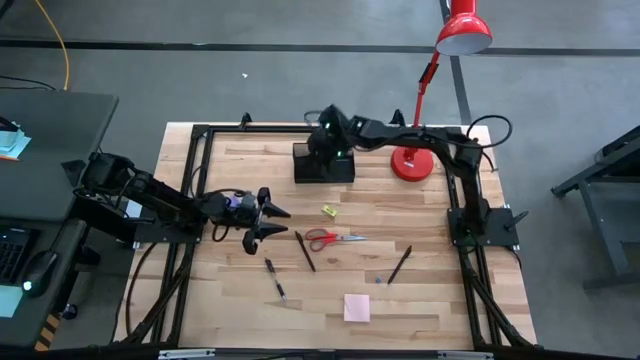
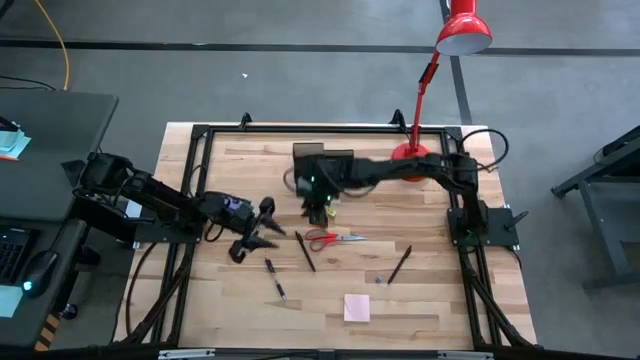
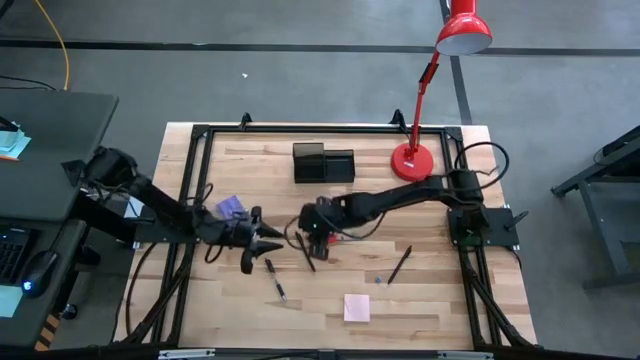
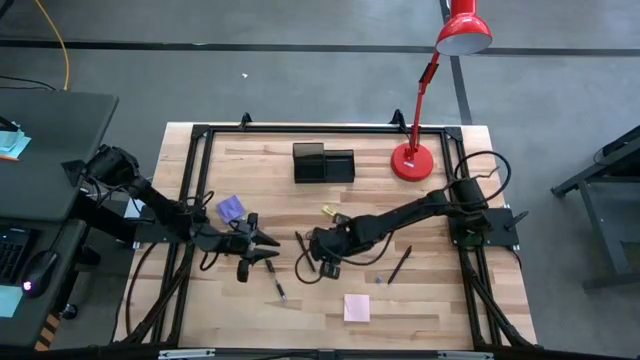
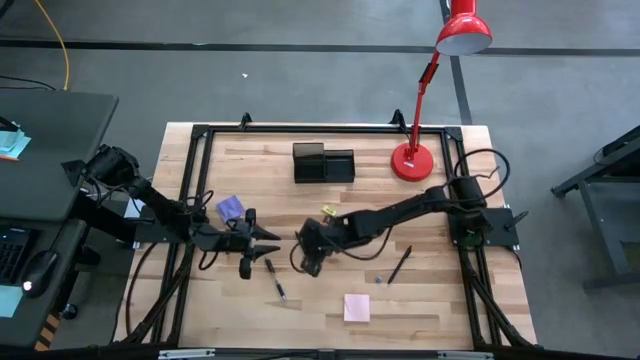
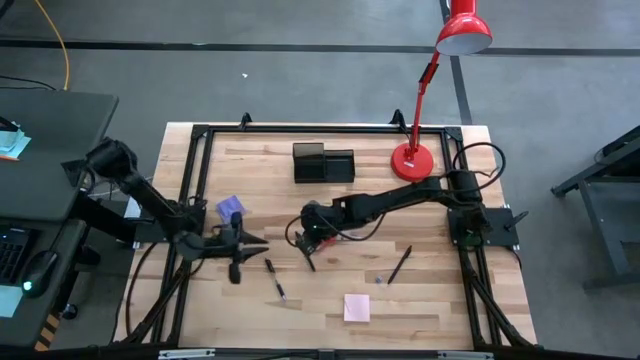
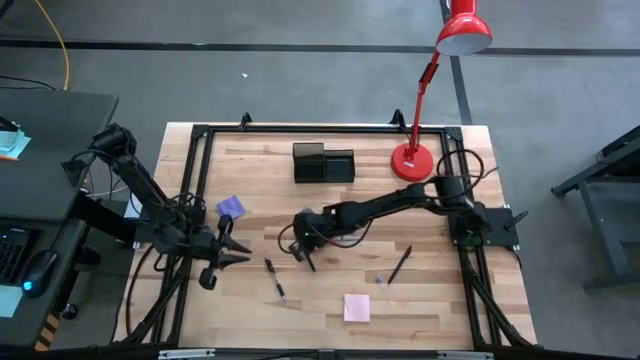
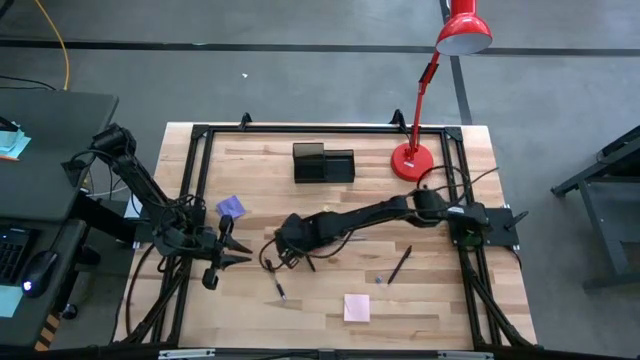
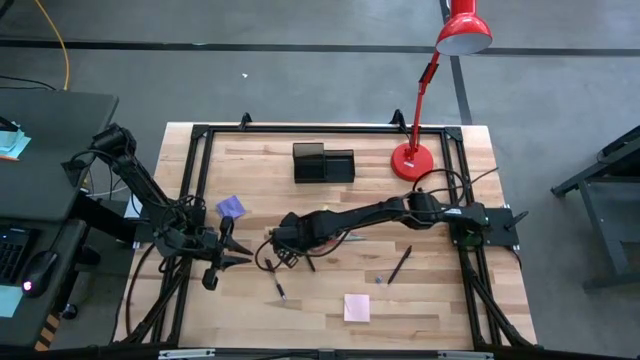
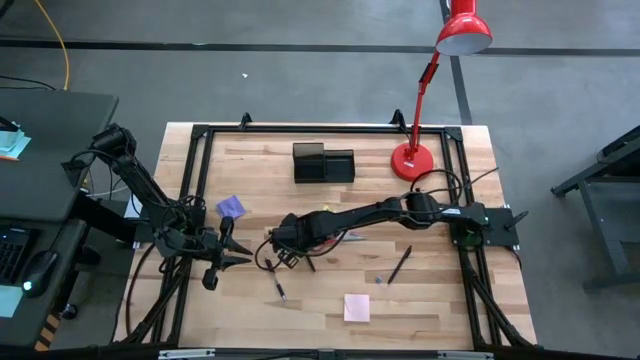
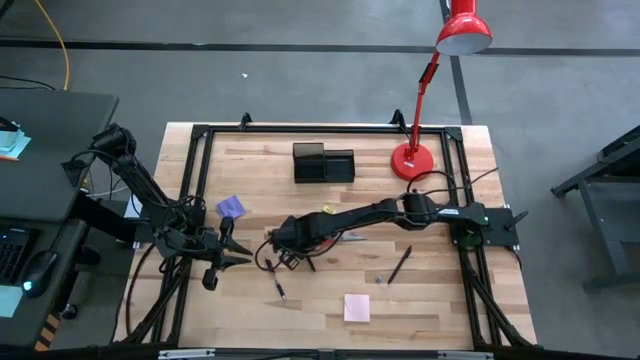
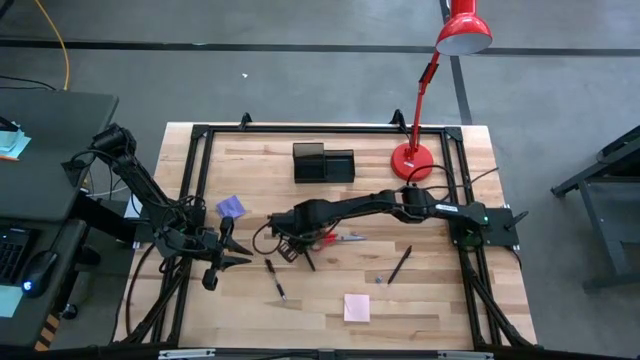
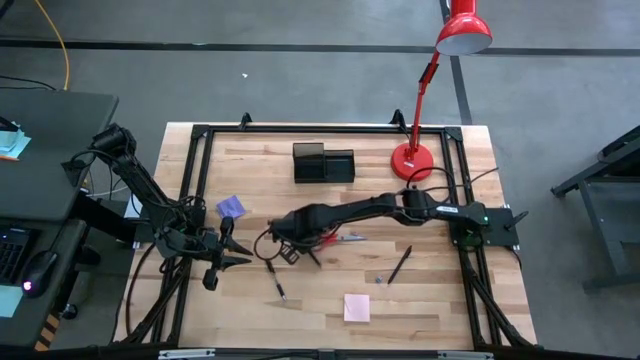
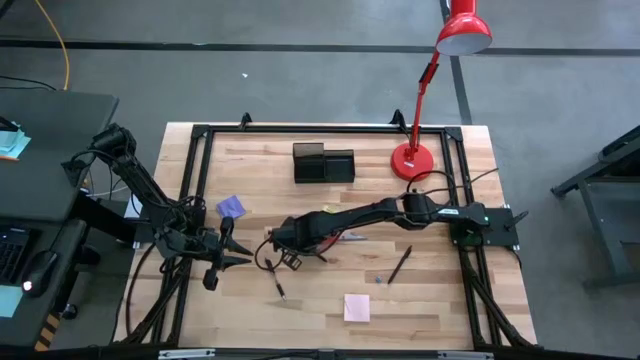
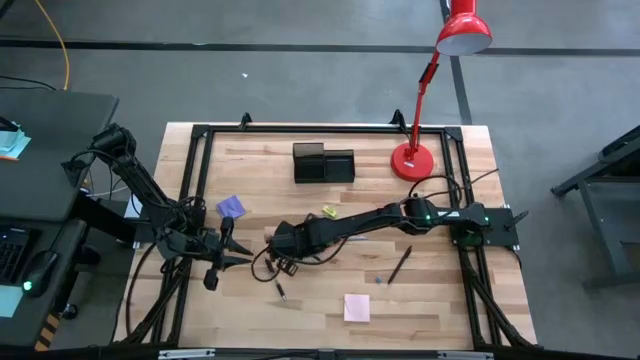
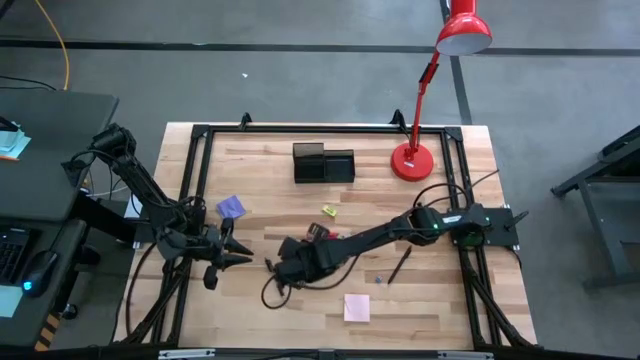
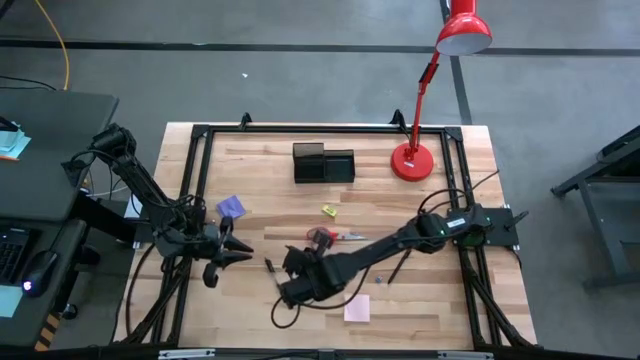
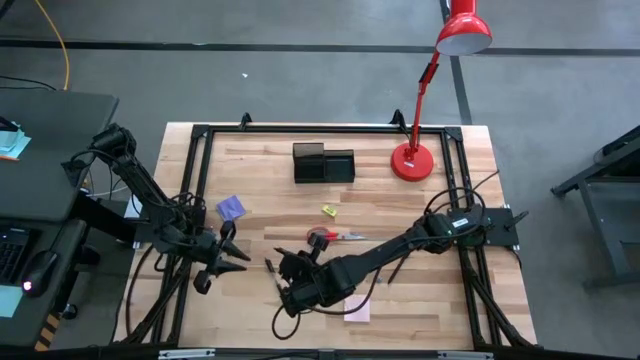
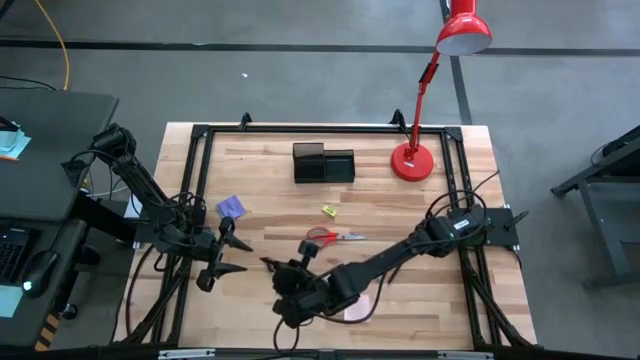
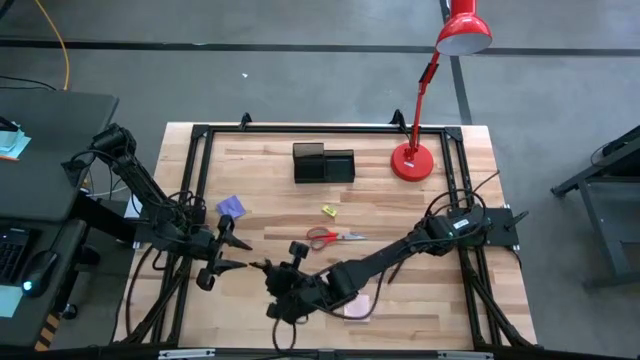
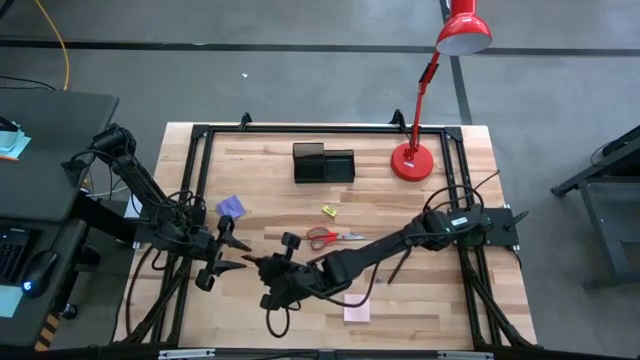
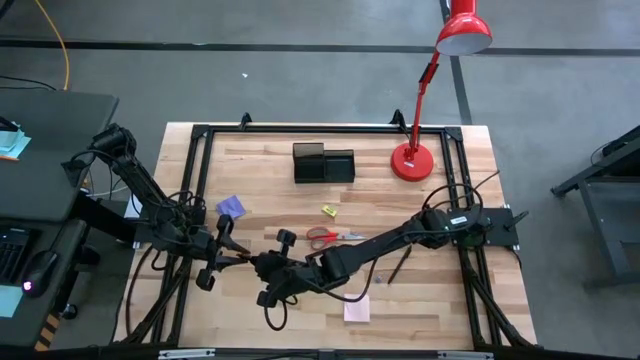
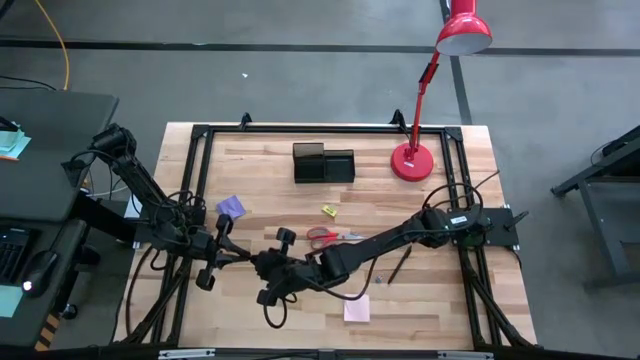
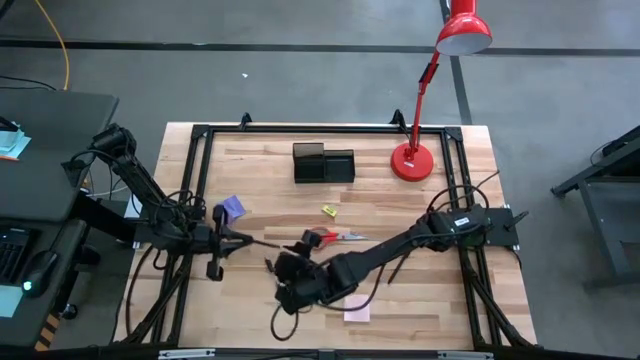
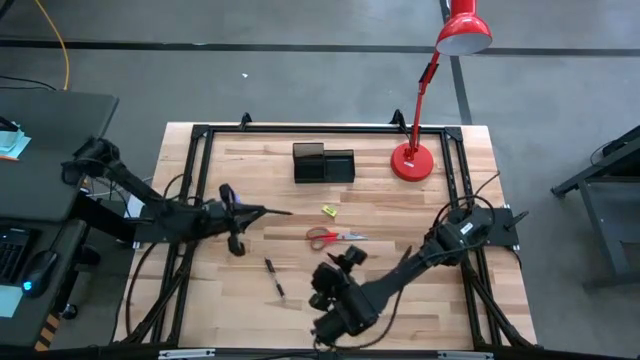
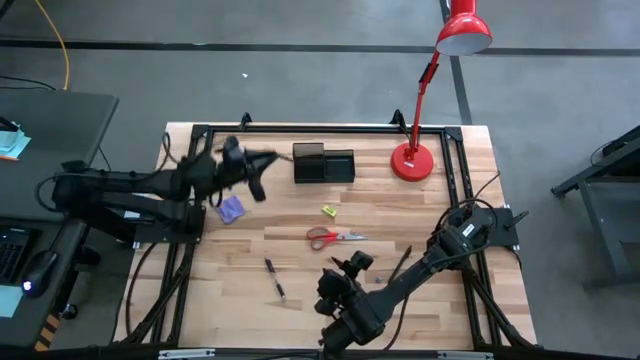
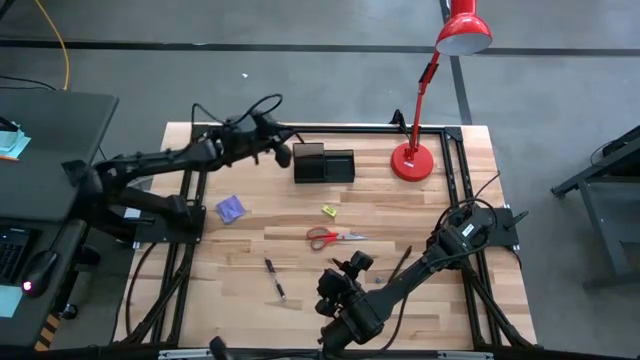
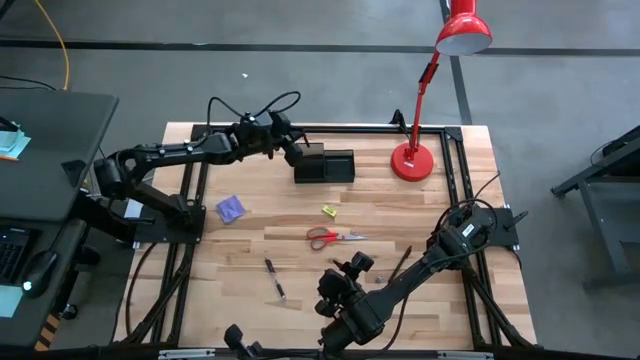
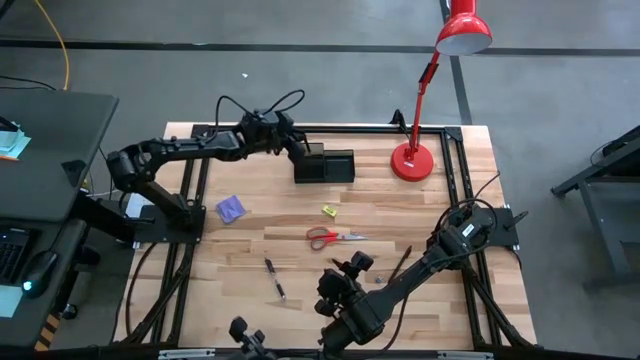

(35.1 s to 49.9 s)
Task: Pick and place office supplies into organizer
Put the left black pen into the desk organizer

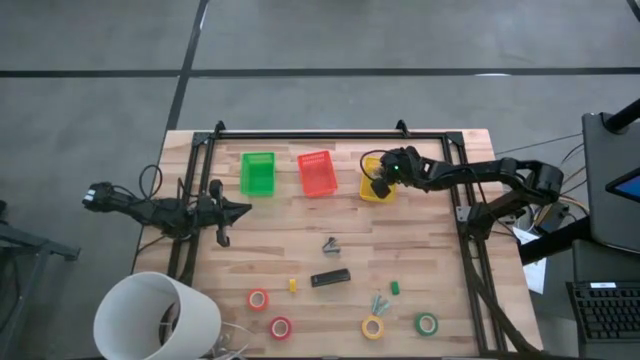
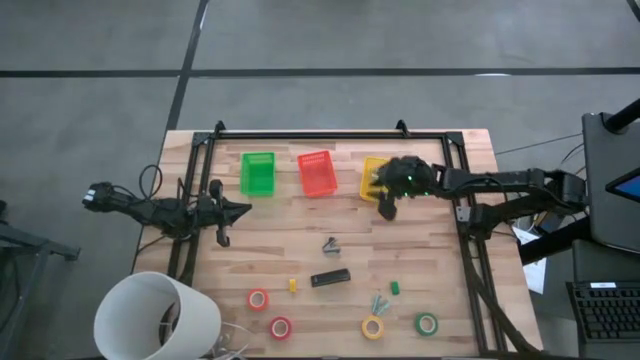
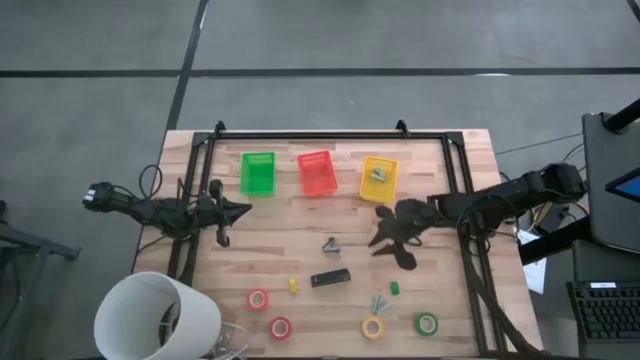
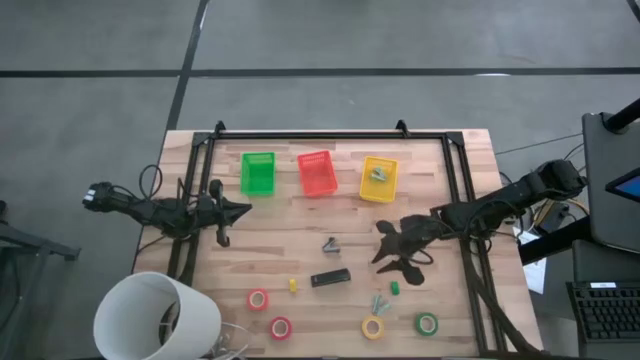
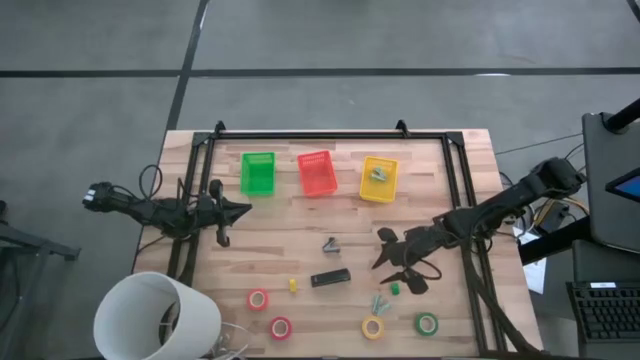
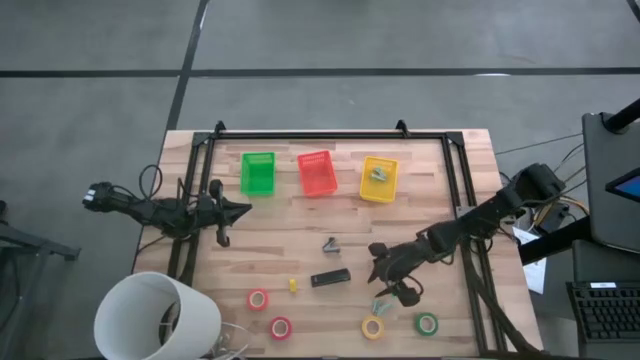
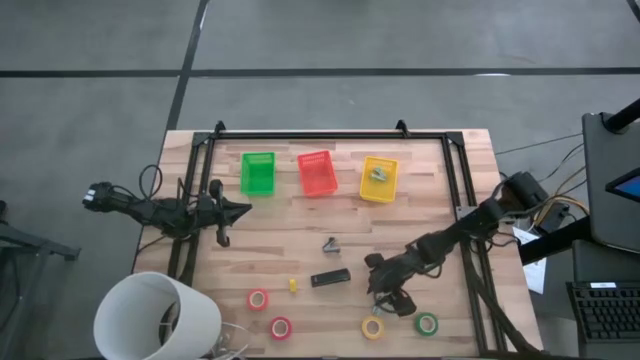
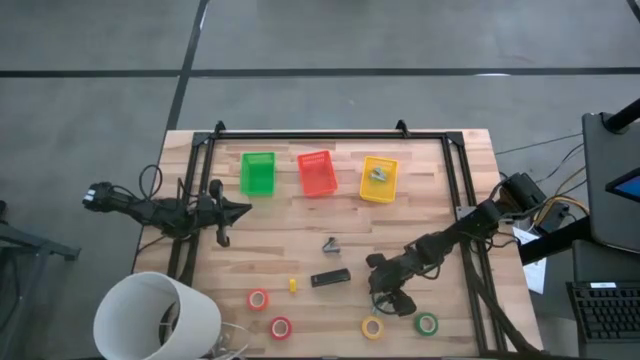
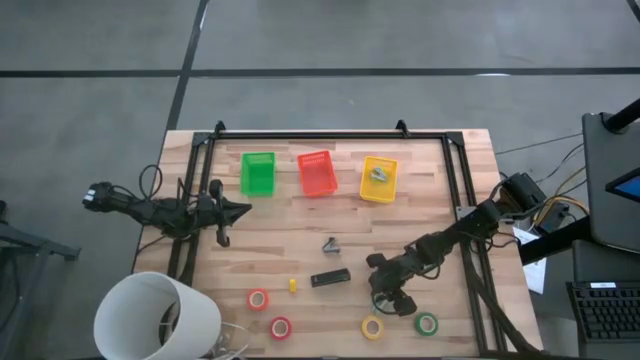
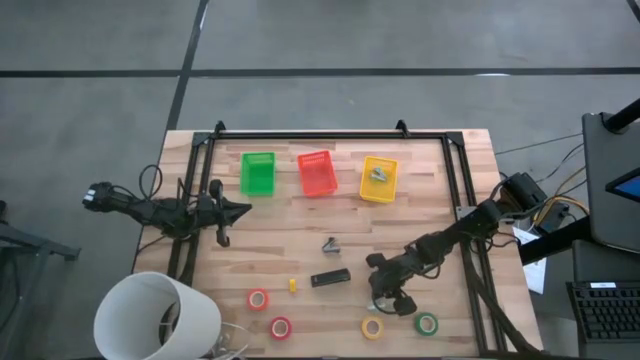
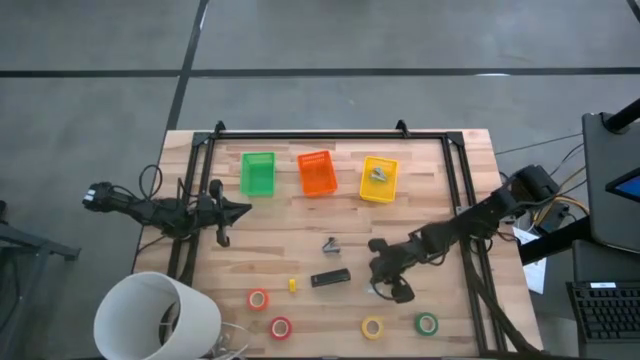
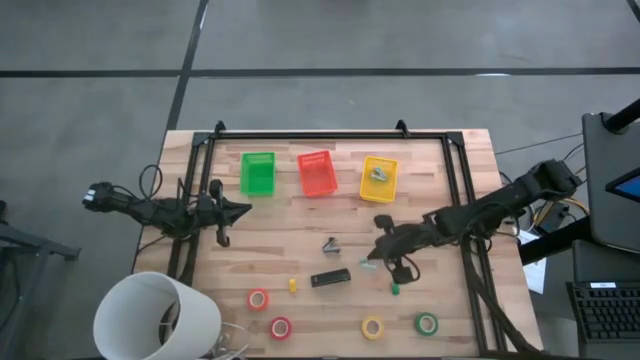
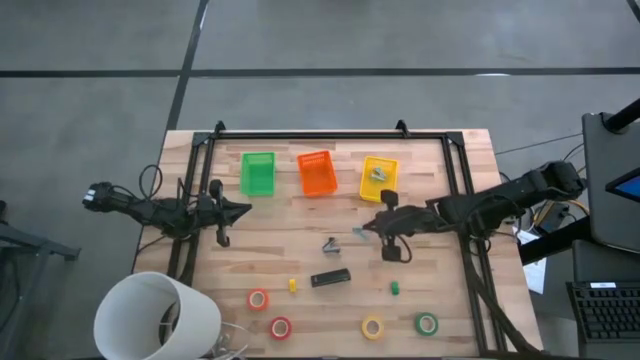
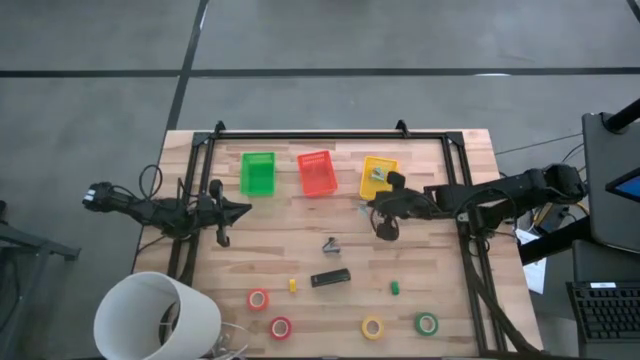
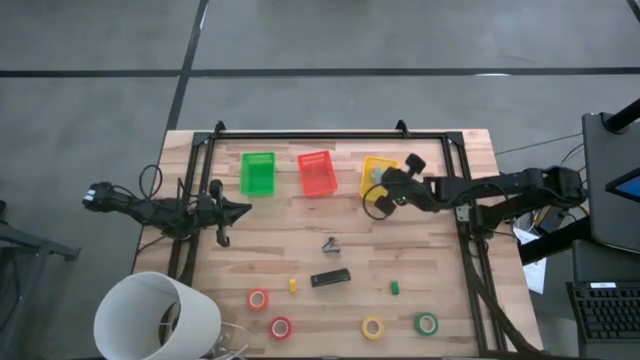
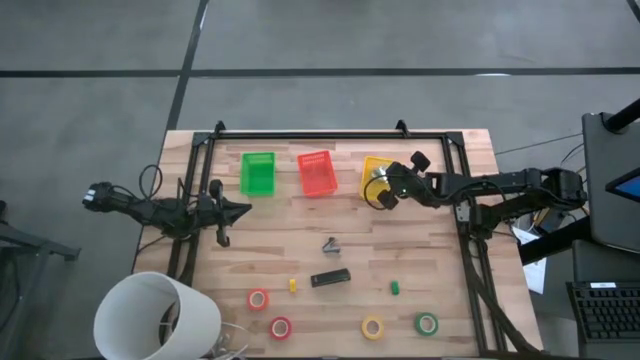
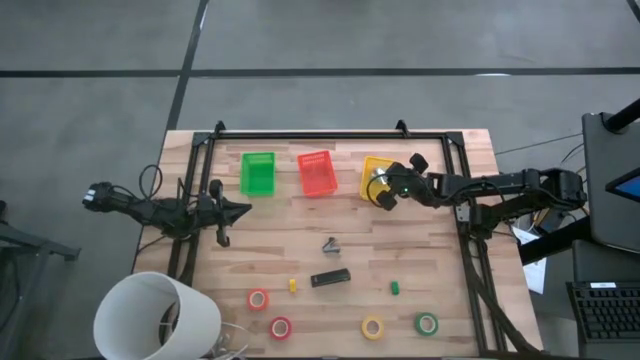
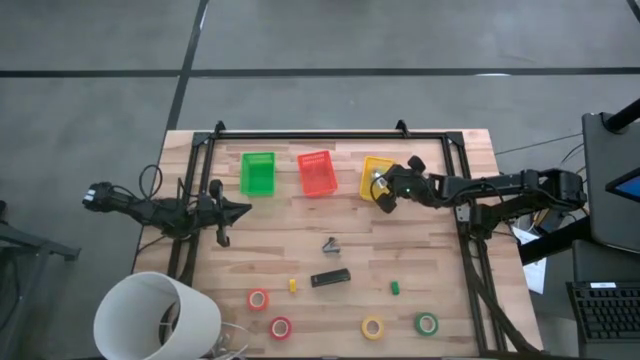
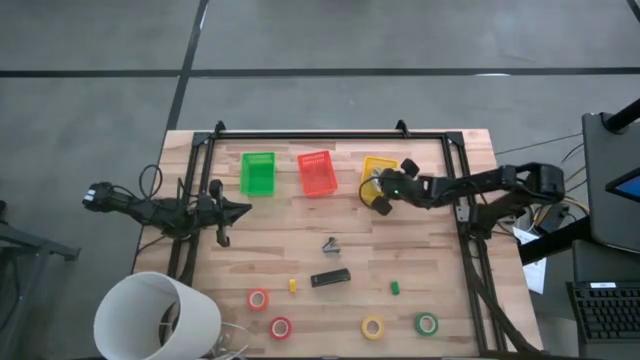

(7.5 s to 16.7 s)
Task: Pick and place Stapler, Stapler remover, tape
Put the light blue staple remover into the yellow bin
